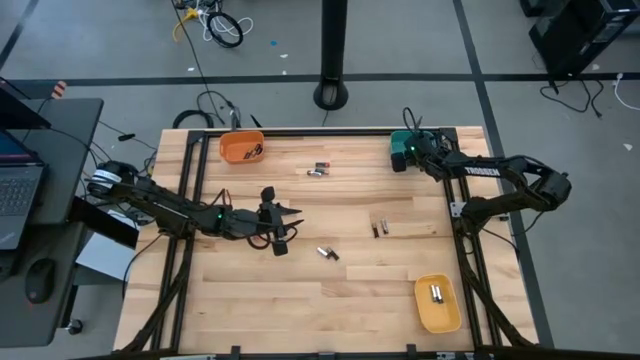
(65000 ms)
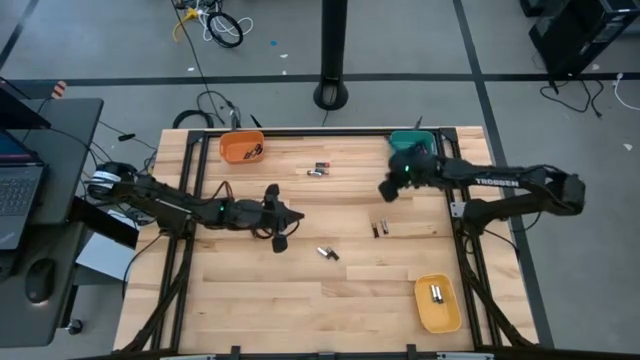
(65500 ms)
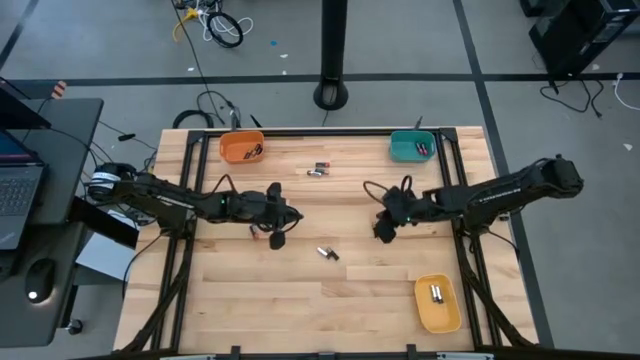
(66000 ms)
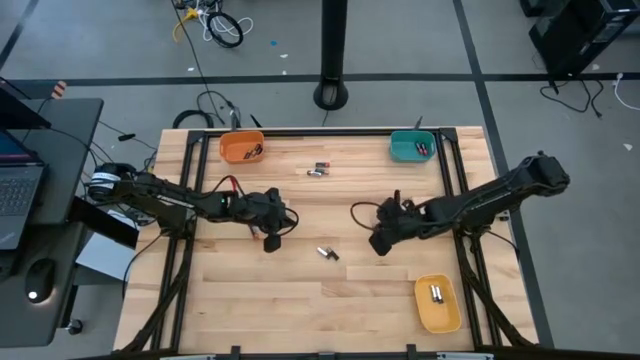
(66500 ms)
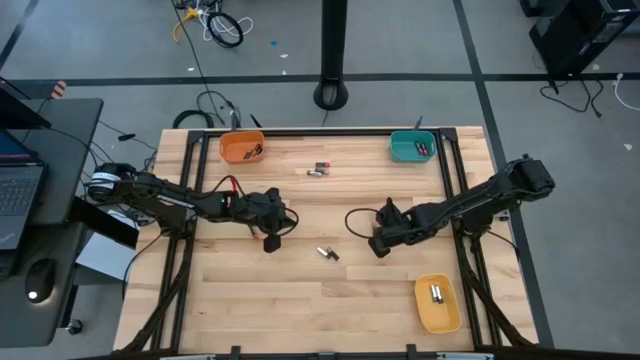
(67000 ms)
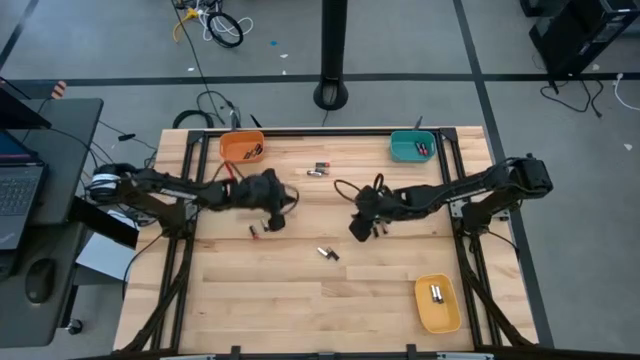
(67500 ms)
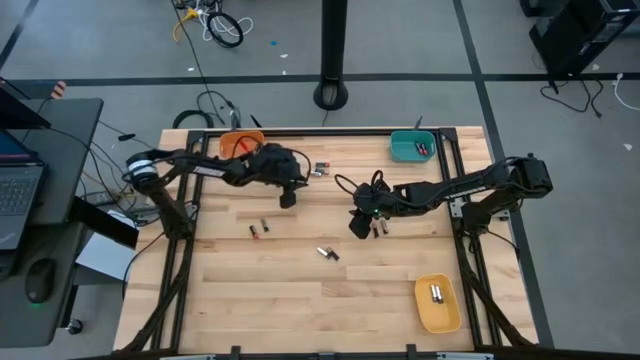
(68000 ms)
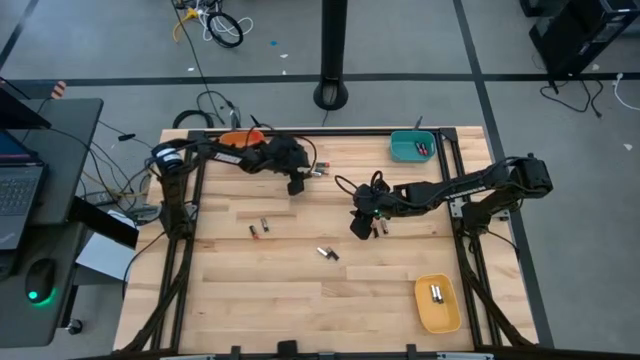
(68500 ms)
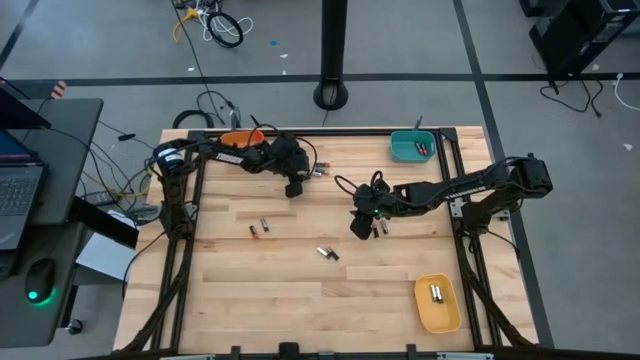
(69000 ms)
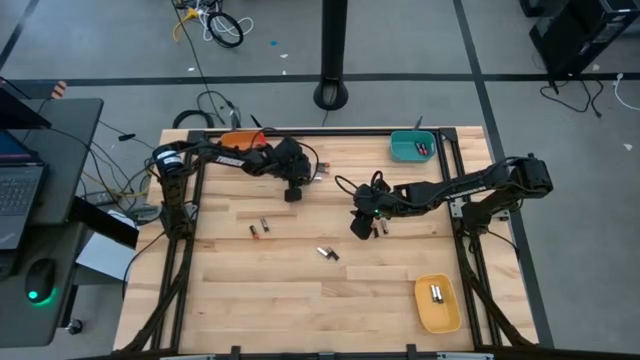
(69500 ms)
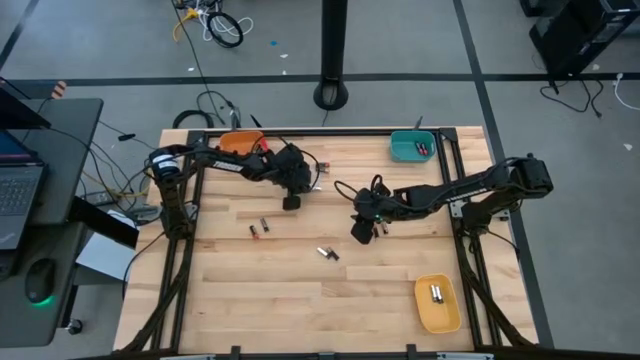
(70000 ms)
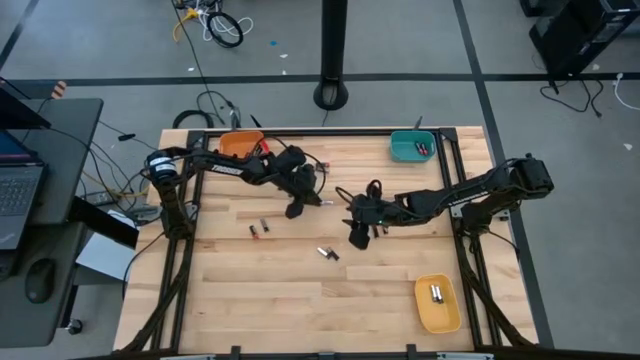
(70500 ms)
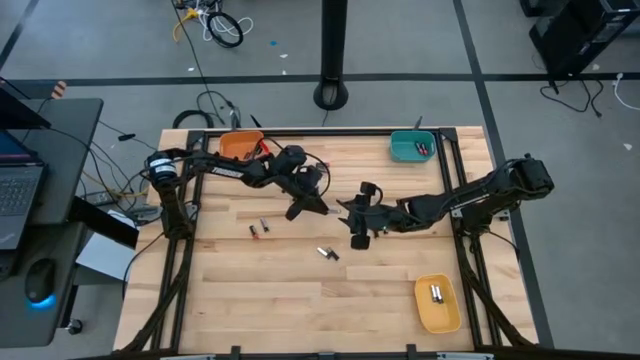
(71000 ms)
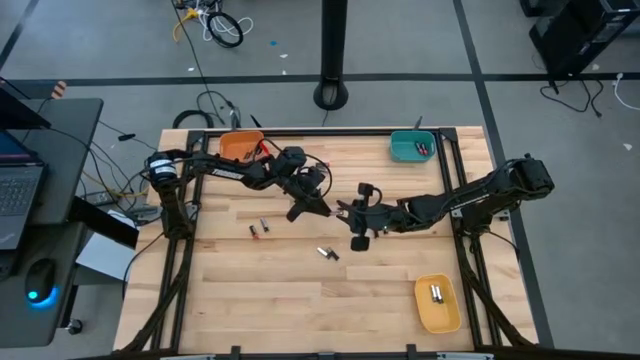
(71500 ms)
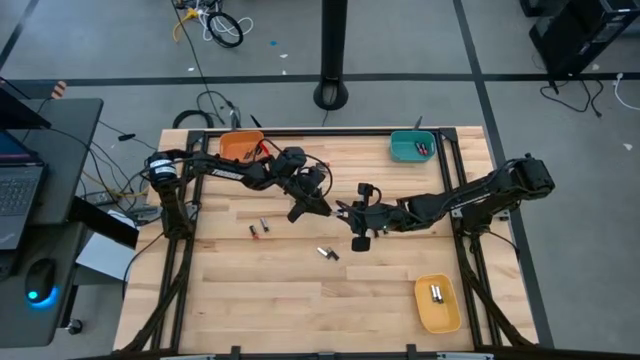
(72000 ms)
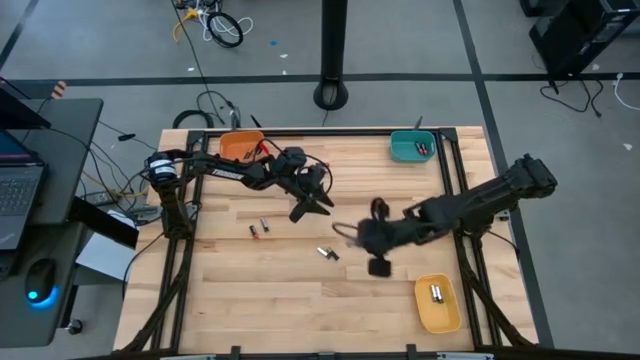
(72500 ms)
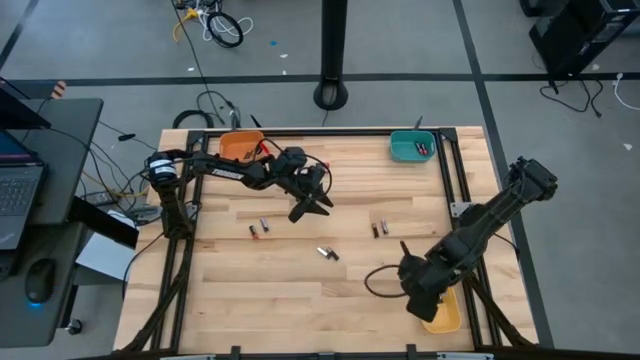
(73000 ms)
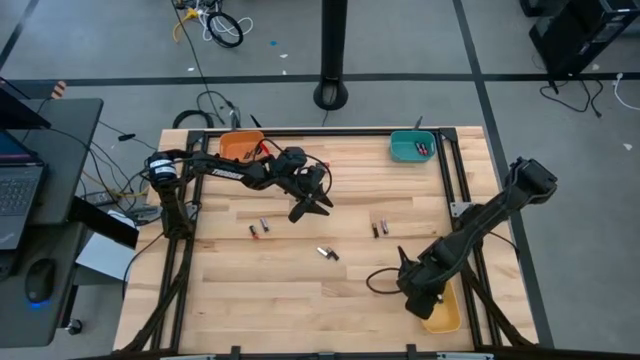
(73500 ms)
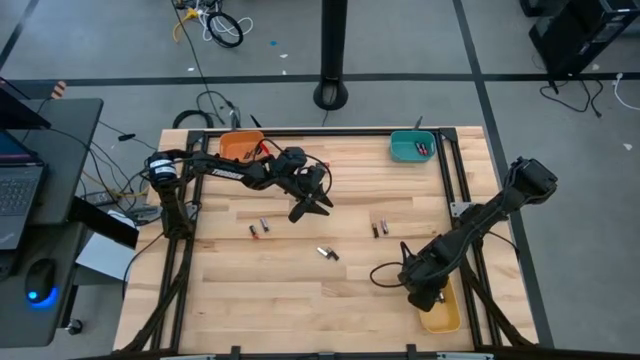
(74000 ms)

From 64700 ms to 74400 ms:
Task: Sort batteries
Put the silver battery into the yellow bin

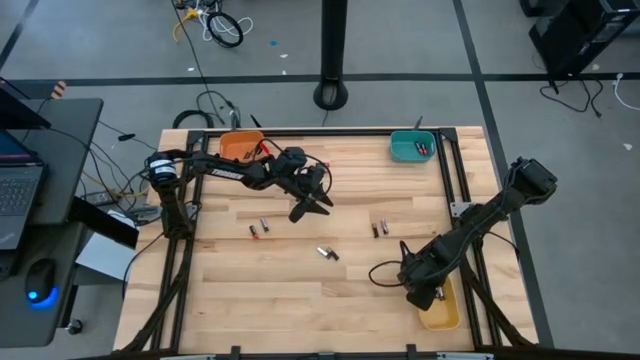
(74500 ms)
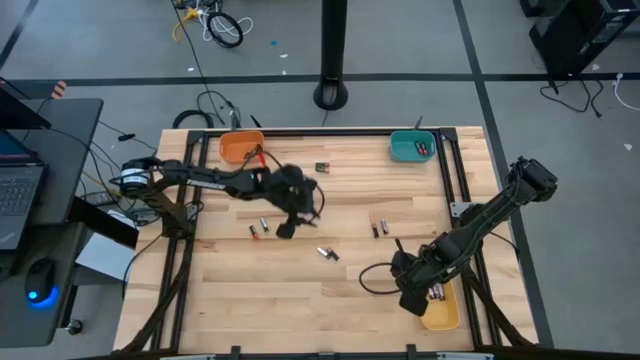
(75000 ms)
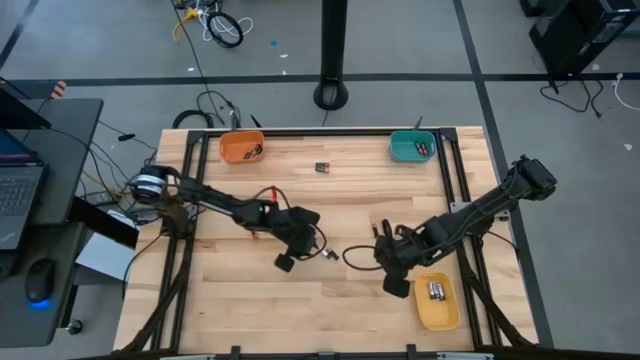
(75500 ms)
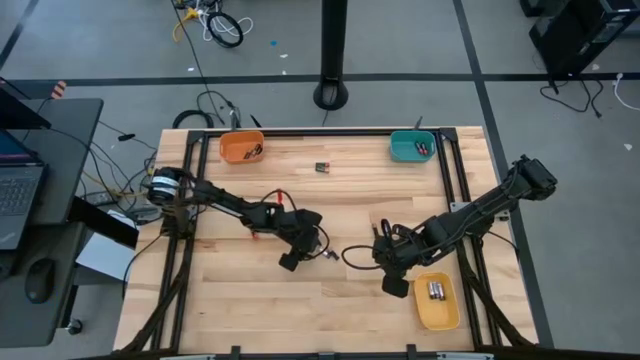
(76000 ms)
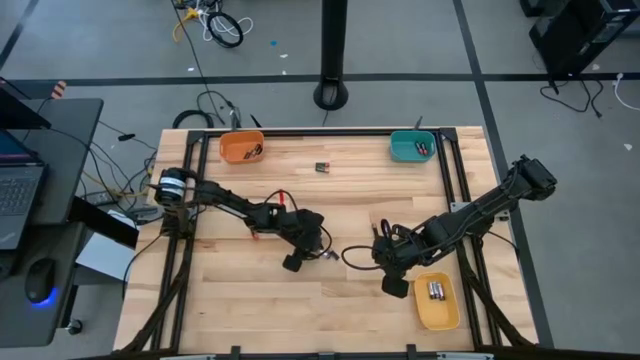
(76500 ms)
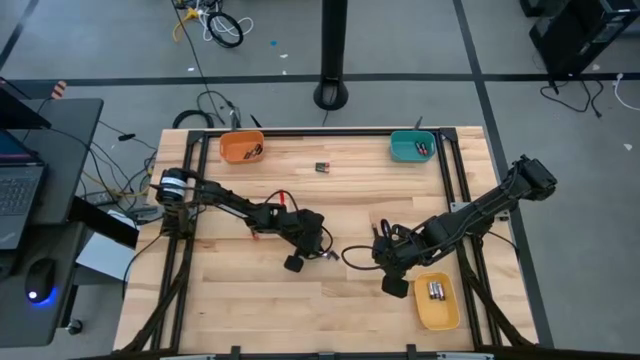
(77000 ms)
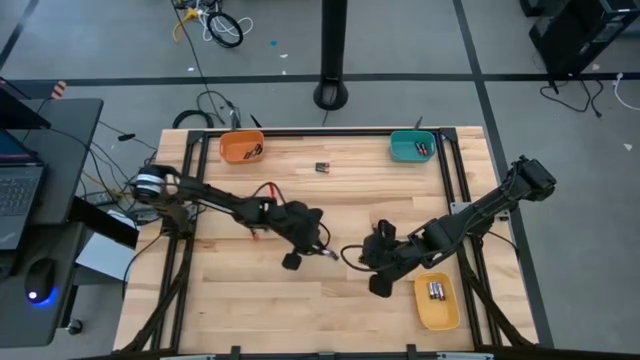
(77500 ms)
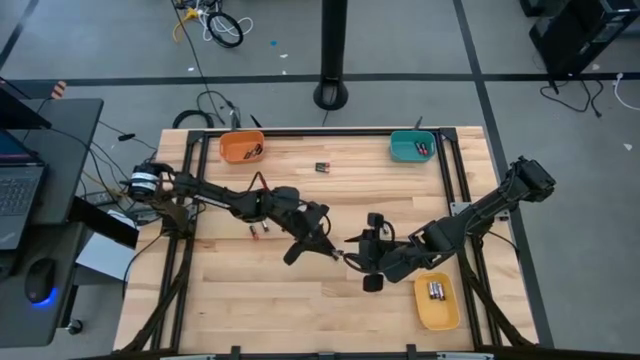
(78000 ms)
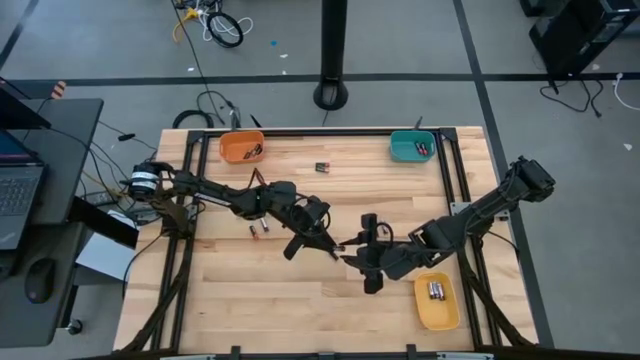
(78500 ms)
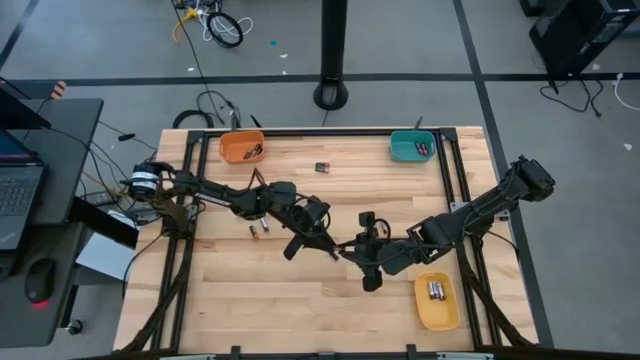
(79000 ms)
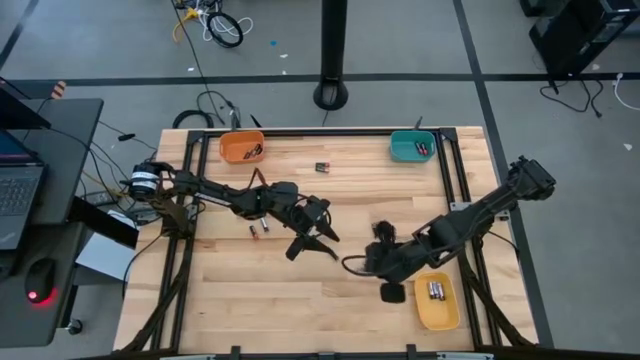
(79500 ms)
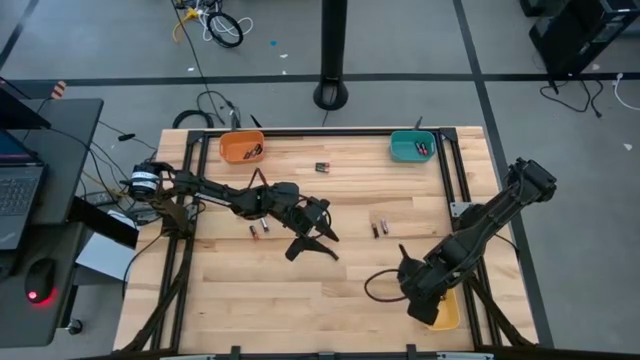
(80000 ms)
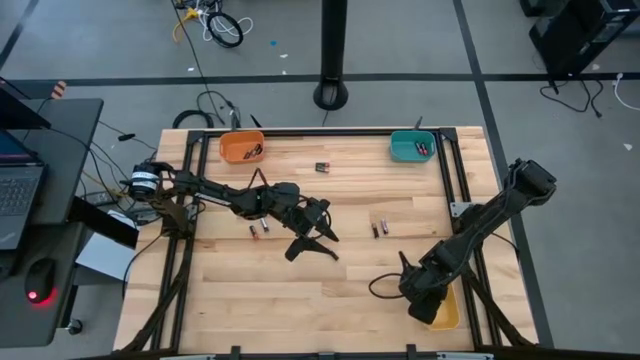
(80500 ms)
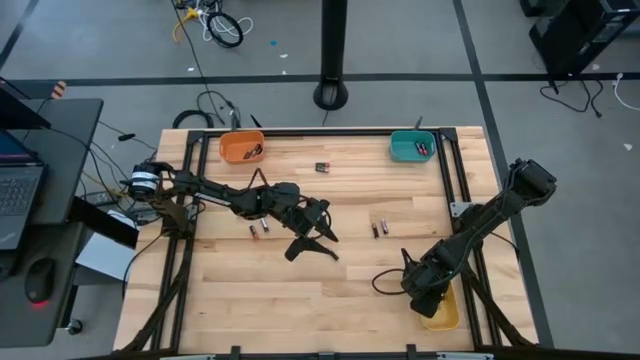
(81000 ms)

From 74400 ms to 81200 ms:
Put the silver battery into the yellow bin

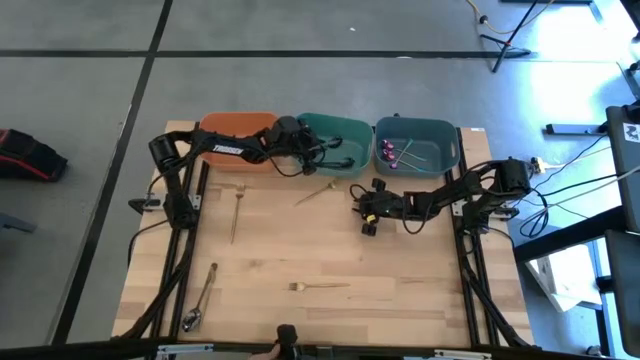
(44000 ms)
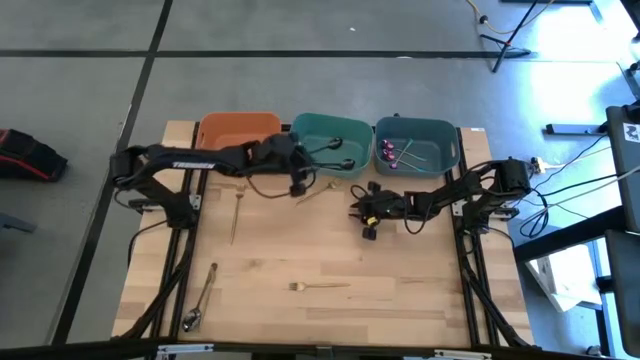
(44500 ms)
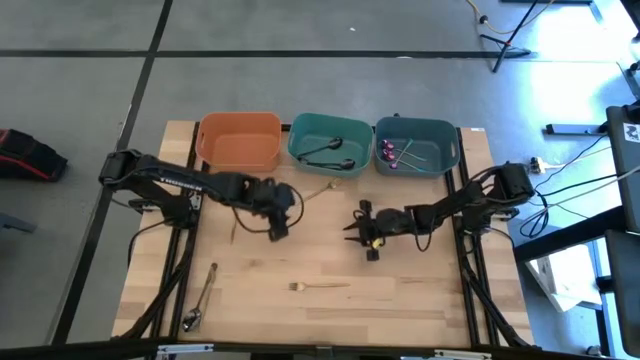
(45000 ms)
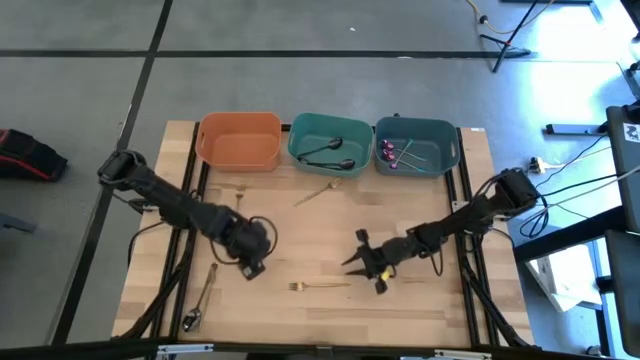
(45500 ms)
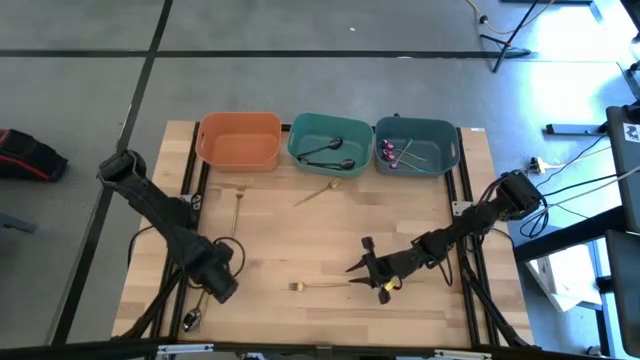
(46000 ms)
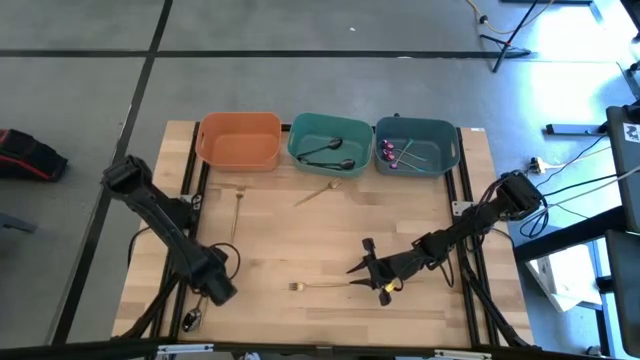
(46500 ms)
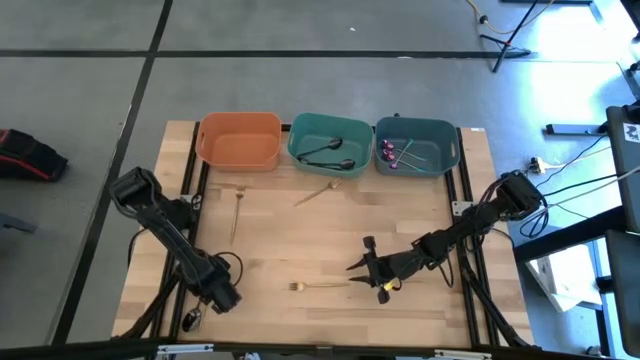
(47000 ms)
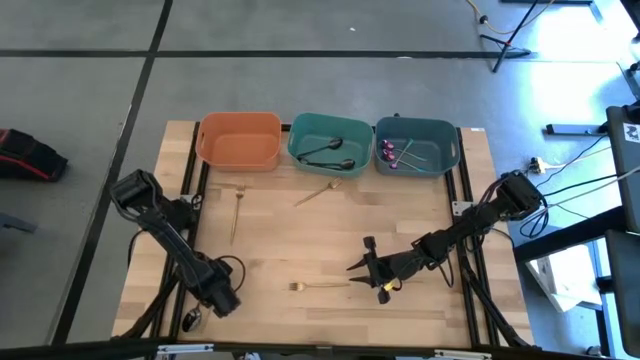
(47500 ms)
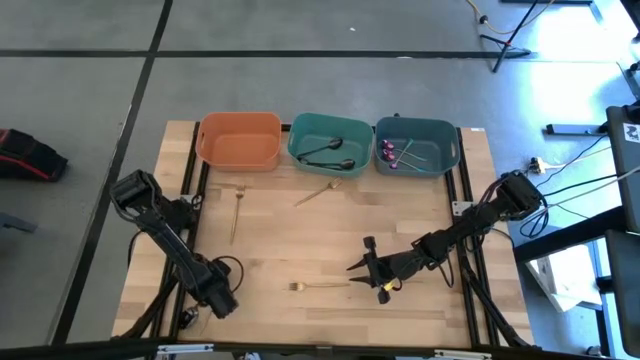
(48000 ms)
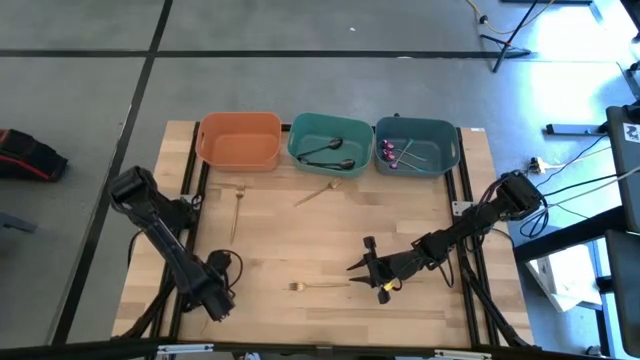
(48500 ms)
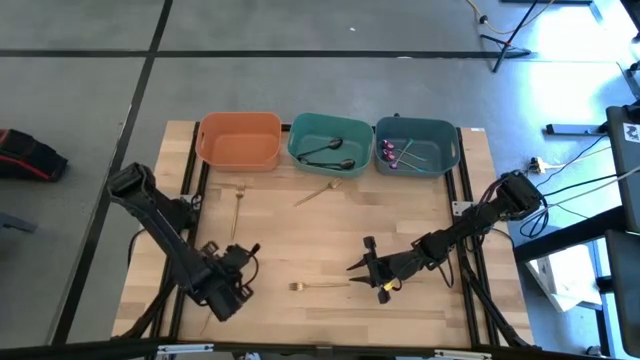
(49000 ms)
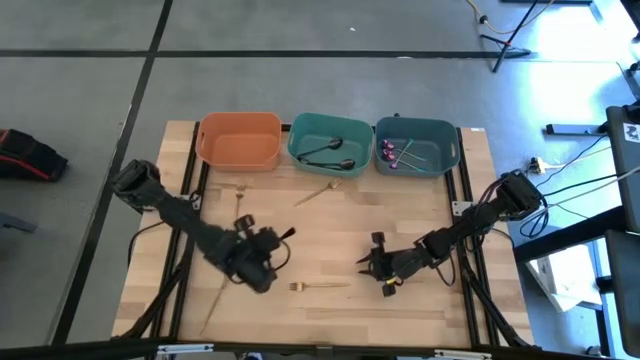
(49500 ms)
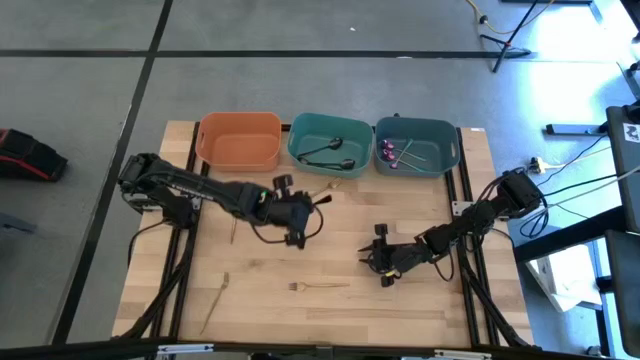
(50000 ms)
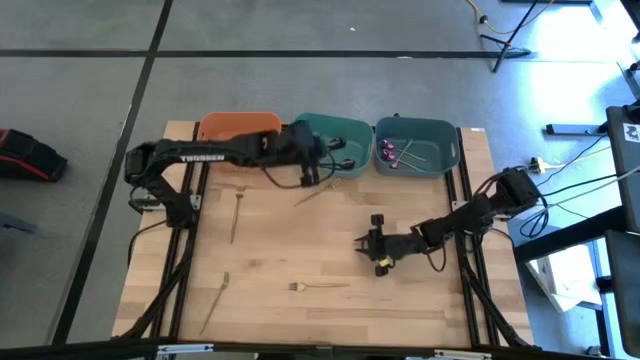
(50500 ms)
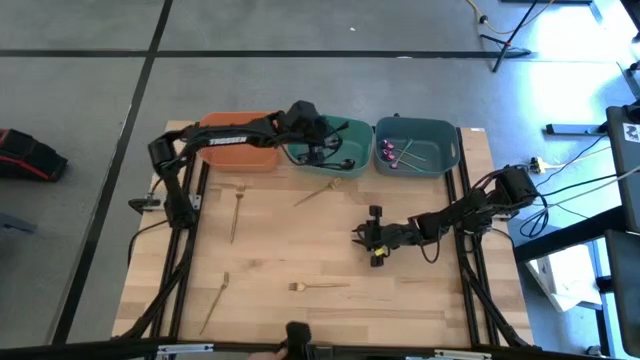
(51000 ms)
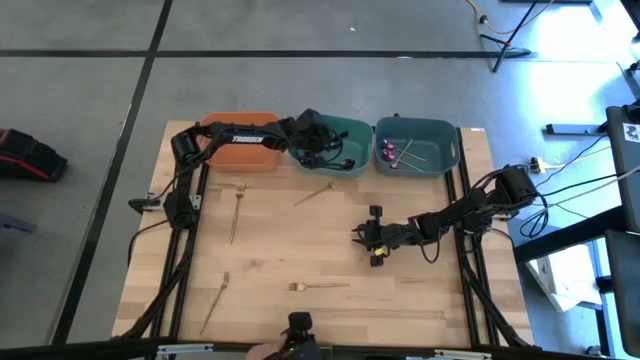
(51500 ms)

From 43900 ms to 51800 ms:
Task: Sort silverware by color (type)
Put the black spoon into the green bin
